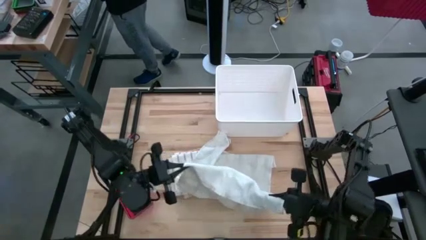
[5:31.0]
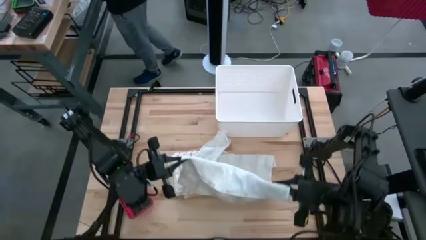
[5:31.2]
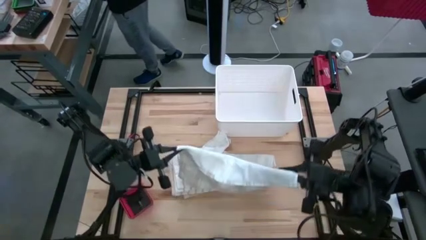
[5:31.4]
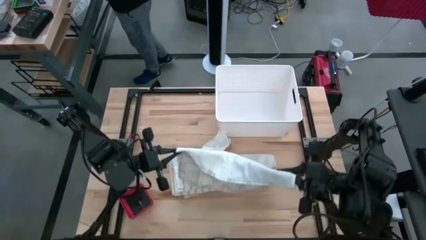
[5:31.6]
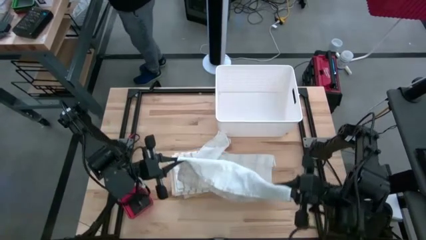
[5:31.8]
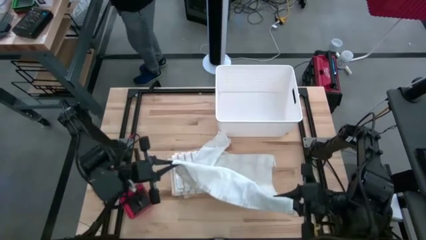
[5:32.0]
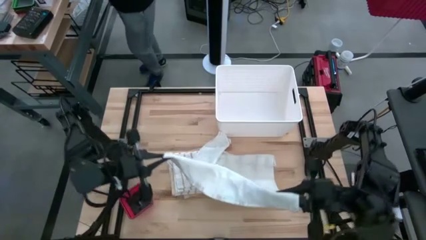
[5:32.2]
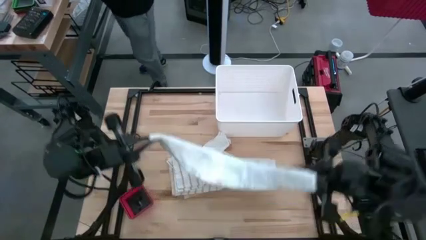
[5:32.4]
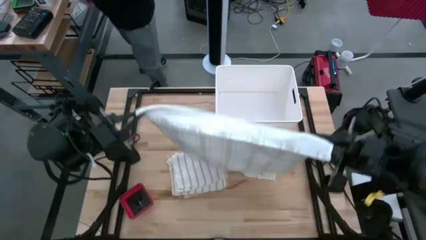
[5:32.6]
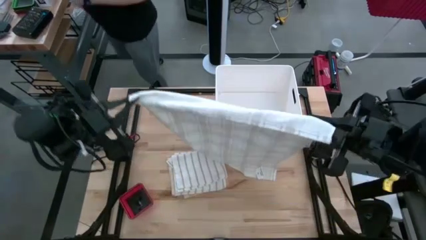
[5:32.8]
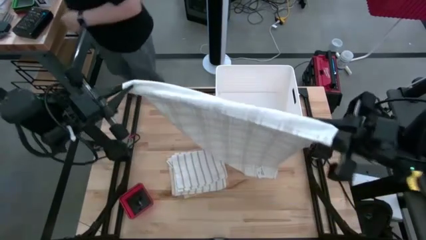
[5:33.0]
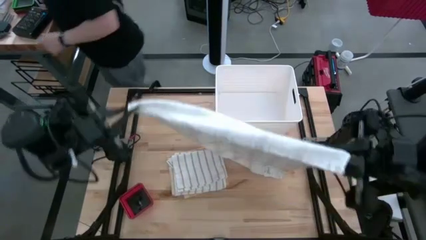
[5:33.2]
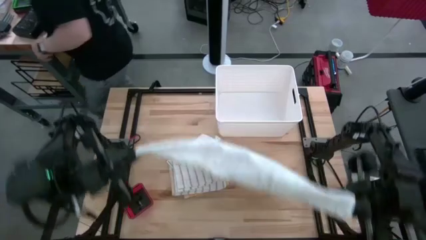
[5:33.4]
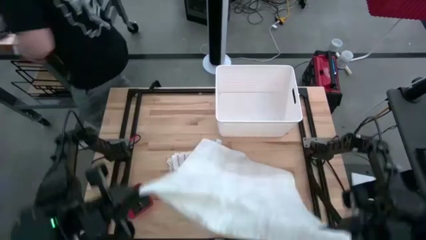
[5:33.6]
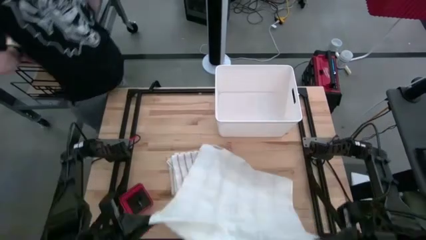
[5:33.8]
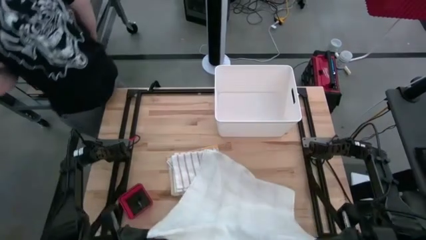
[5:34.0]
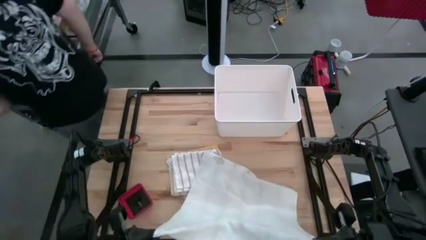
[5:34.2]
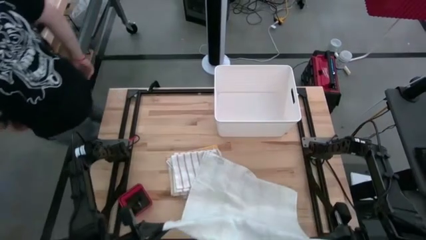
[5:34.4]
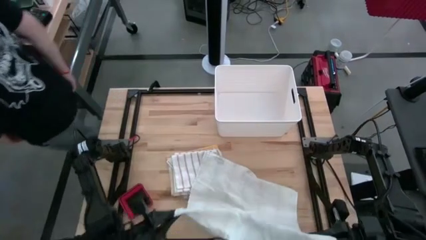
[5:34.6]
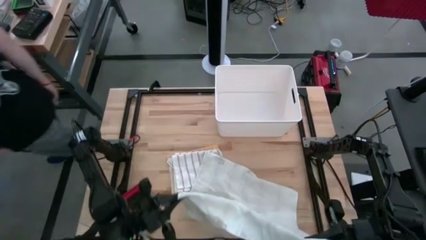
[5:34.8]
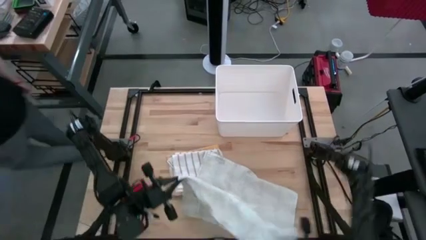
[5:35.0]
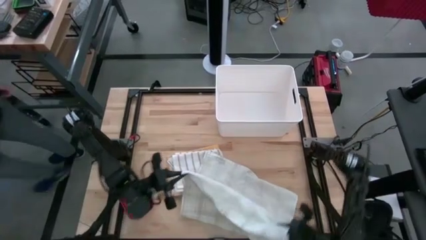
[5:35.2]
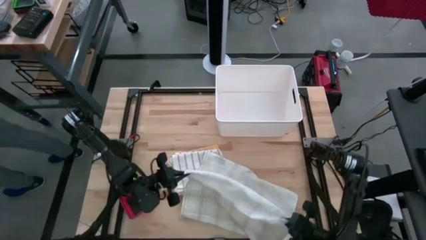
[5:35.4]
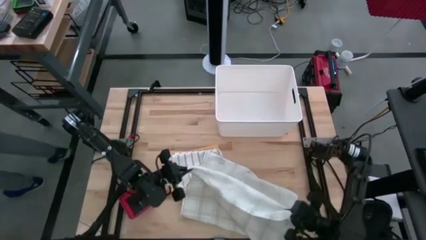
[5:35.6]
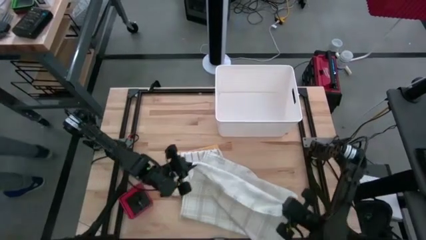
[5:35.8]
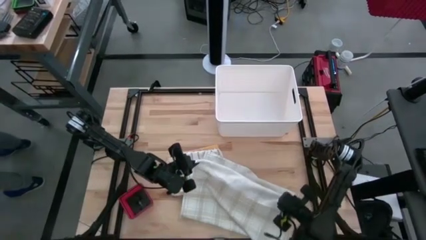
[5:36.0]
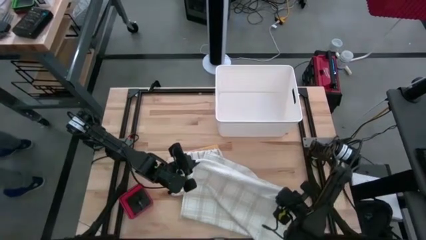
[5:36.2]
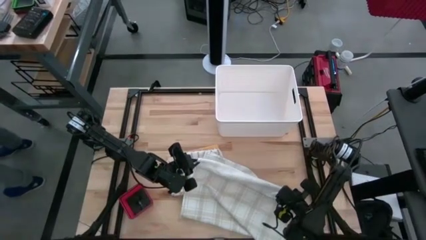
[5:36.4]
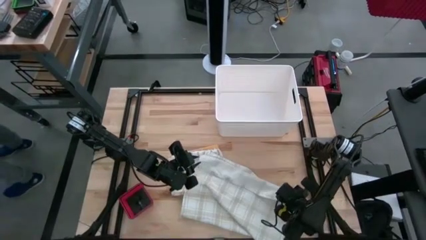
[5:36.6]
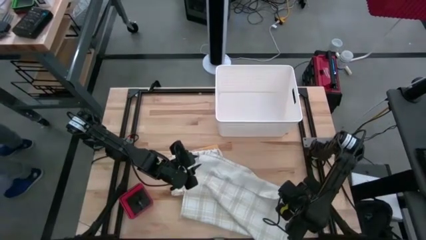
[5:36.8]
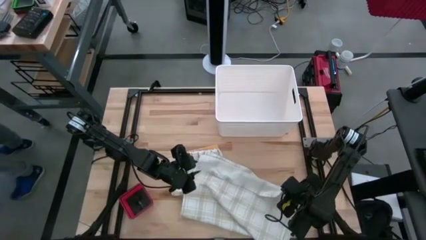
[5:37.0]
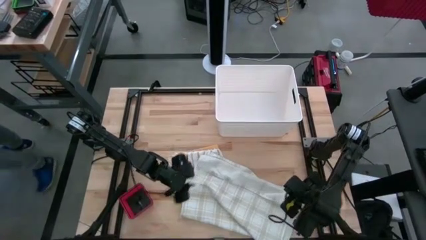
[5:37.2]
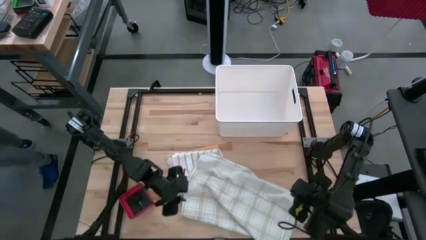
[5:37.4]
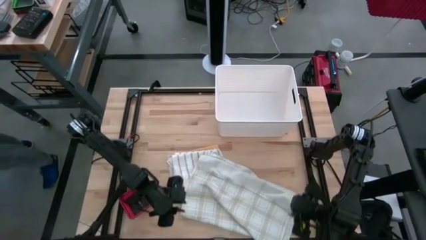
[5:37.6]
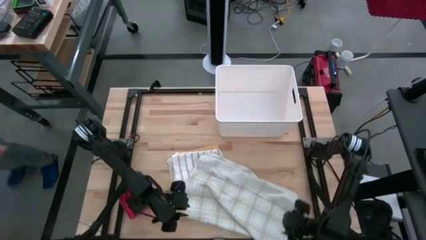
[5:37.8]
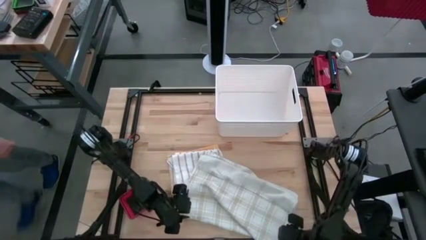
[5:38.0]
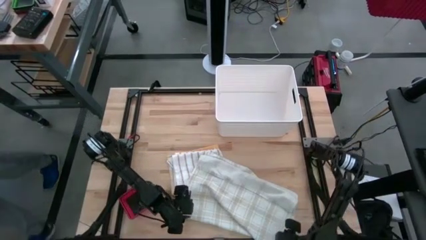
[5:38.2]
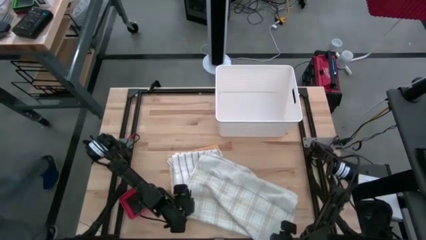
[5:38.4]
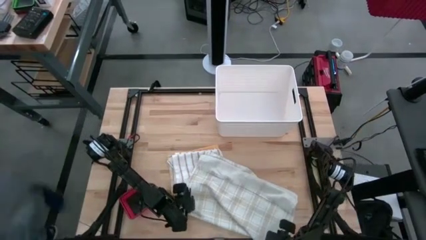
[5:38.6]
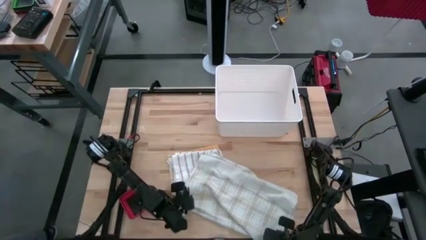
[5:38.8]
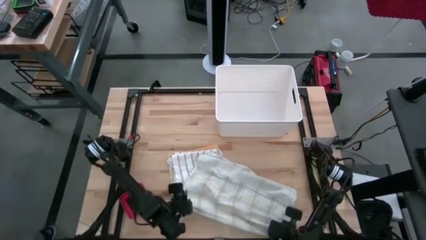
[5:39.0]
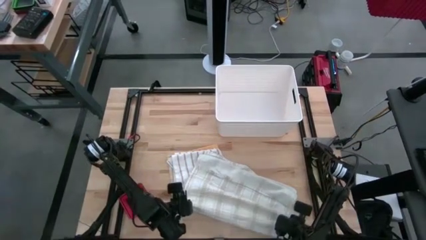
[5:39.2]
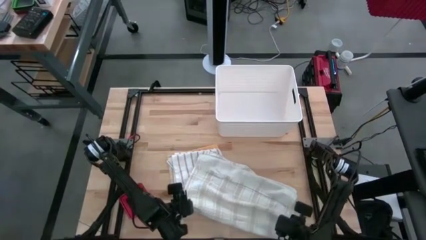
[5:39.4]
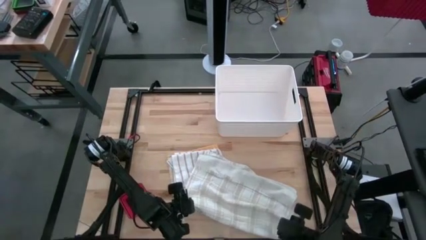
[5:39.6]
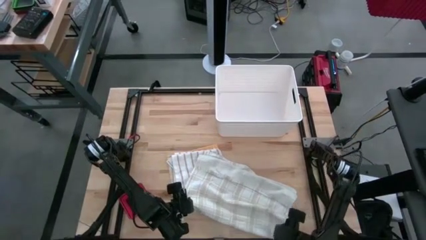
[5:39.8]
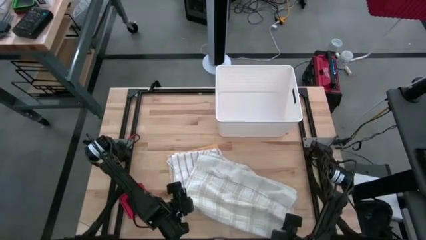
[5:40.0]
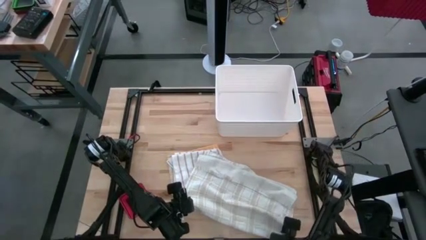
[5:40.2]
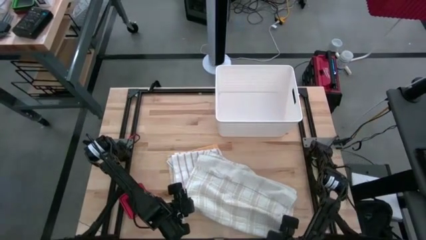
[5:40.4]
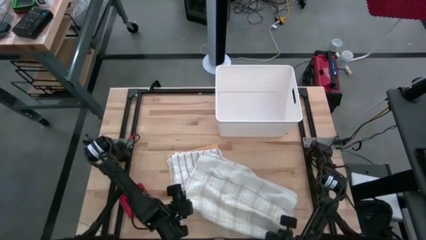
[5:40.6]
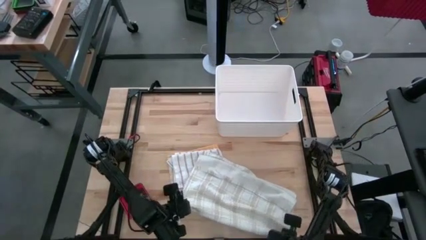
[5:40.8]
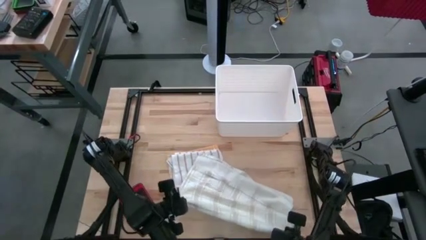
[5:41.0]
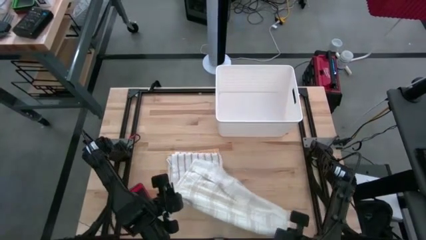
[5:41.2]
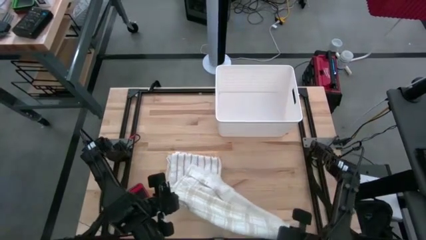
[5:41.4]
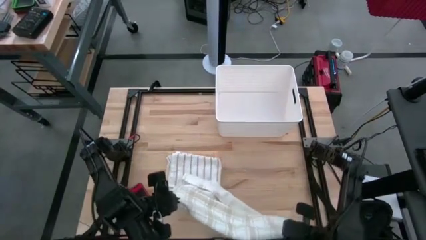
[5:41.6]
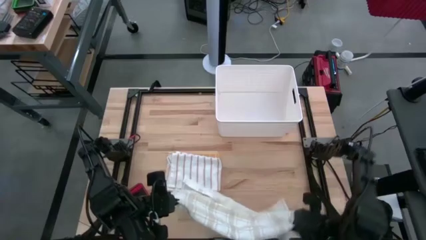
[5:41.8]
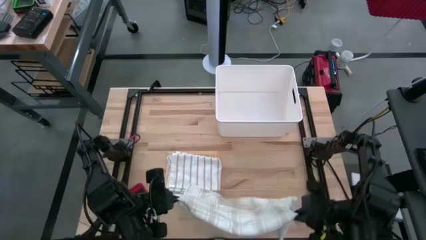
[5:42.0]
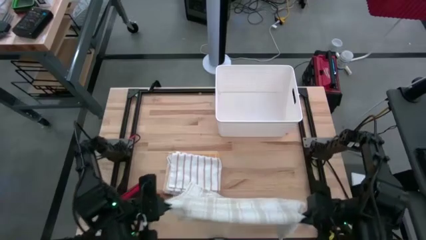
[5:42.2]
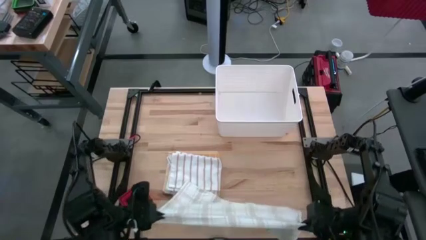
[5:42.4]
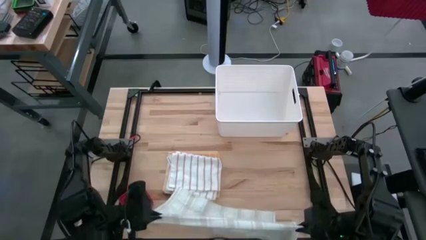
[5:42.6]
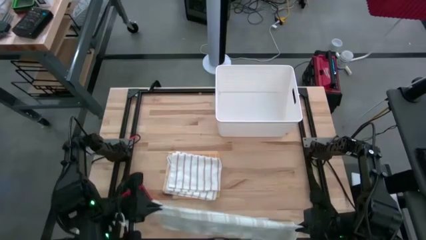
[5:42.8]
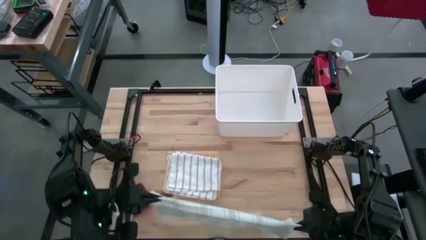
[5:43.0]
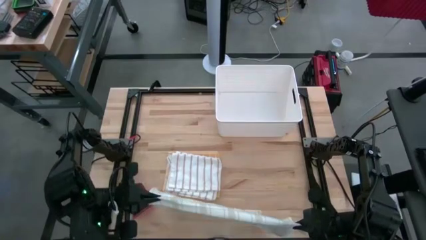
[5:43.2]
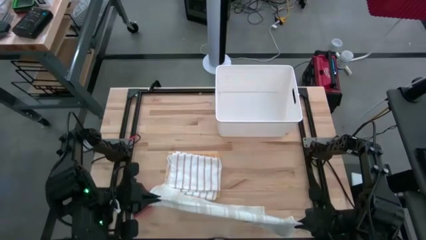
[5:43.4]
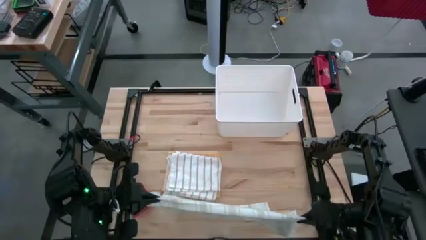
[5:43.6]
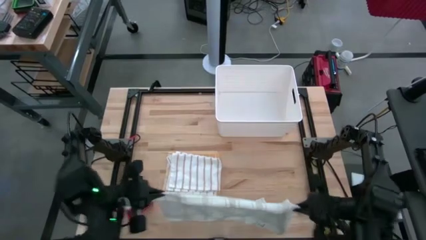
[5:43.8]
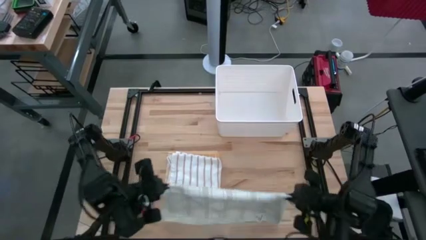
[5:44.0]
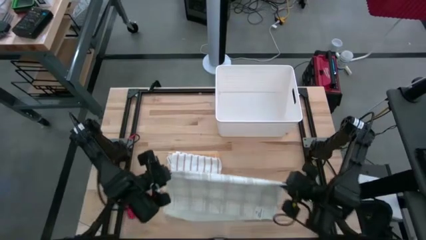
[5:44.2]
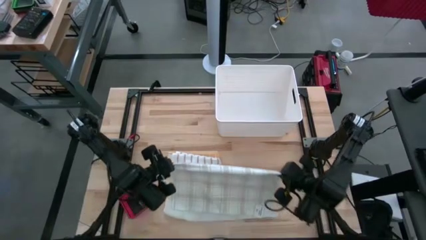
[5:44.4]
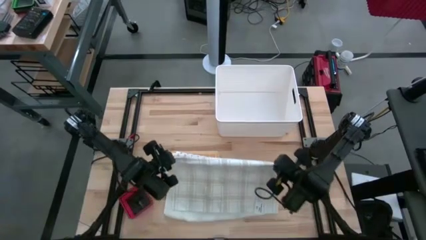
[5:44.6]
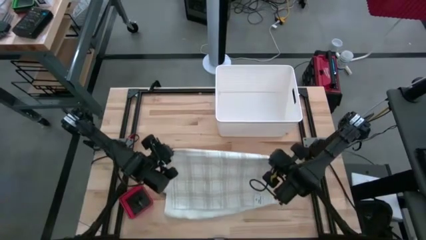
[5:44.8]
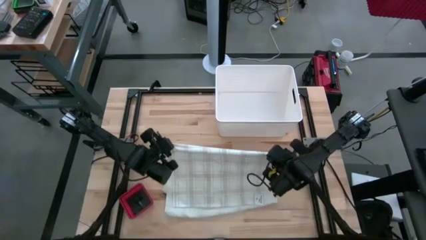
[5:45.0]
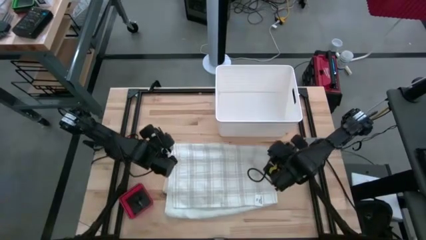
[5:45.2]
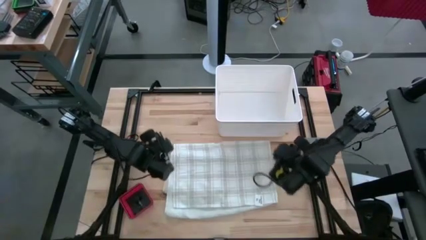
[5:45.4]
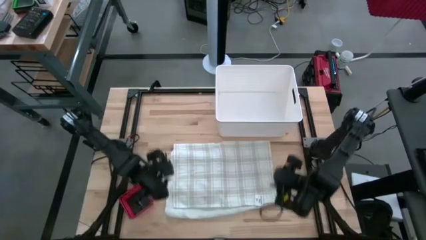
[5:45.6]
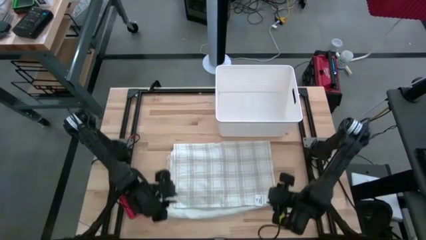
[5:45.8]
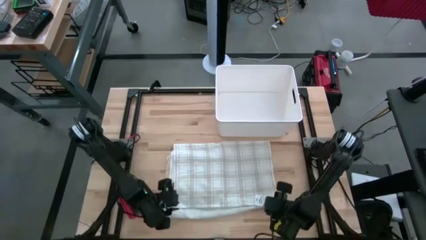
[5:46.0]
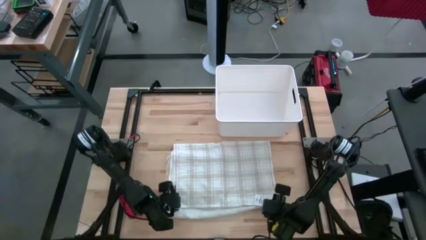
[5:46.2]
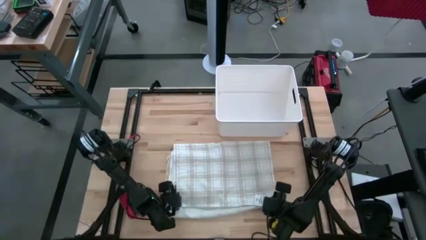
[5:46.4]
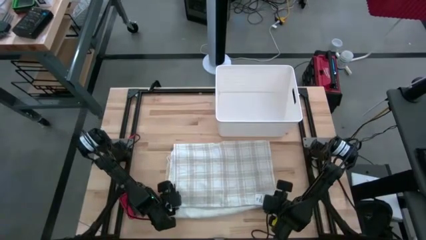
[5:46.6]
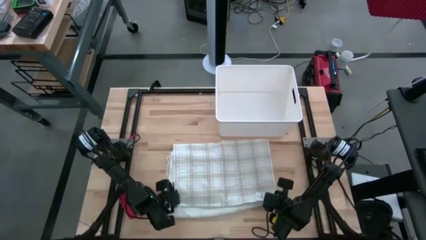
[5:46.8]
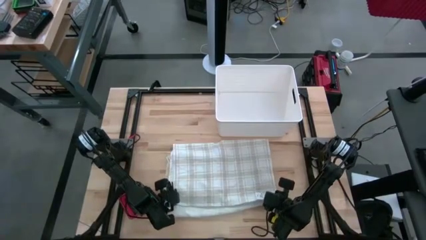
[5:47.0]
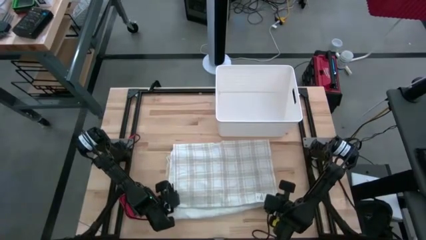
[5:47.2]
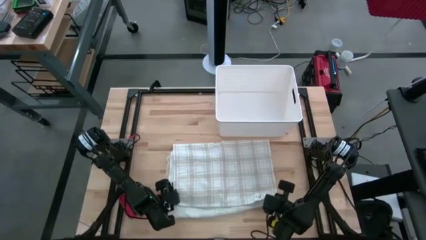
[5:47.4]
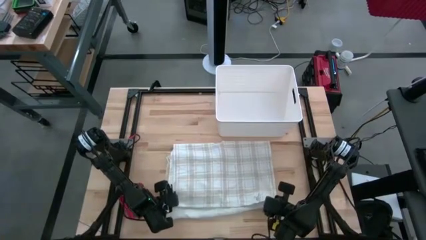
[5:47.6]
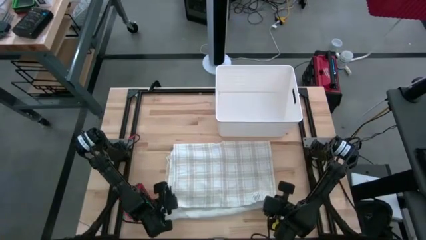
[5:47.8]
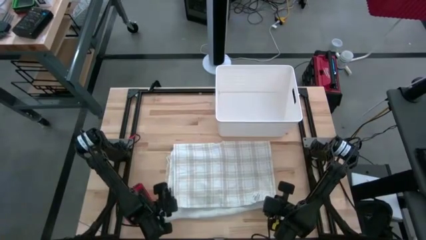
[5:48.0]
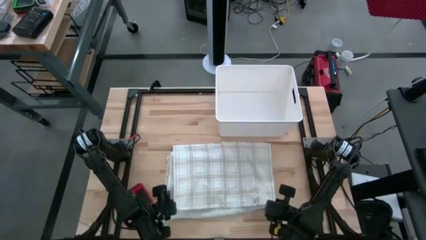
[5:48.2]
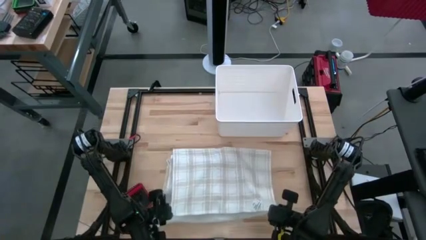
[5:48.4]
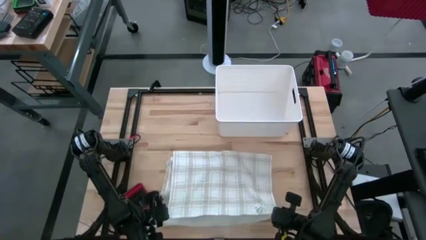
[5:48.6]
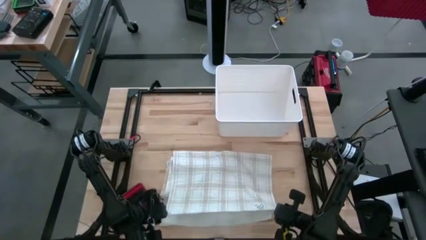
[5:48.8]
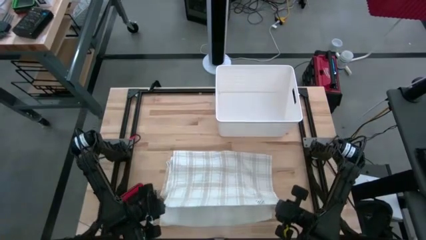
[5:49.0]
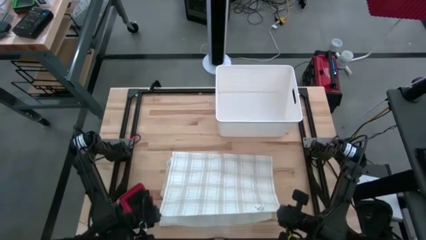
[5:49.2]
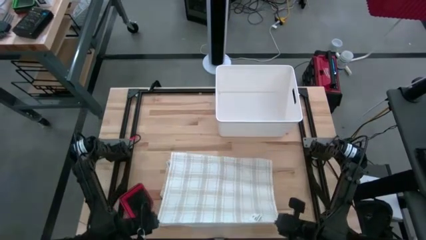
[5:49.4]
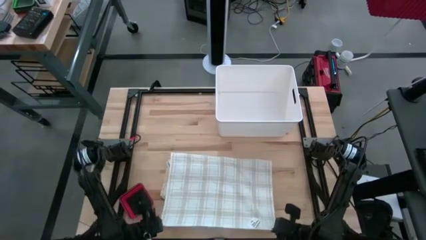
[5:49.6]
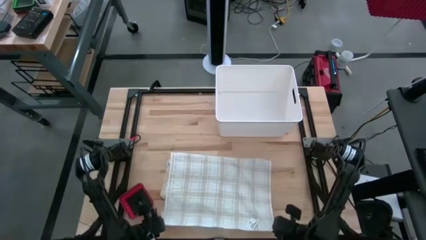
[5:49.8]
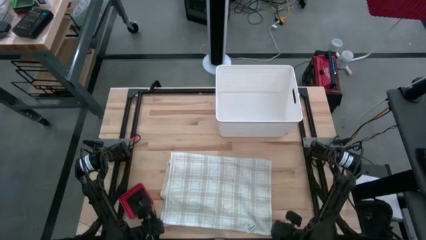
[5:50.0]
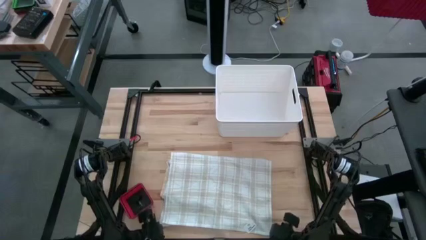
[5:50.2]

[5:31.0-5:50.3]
Task: Fold towel
Fold the light gray patterned towel
